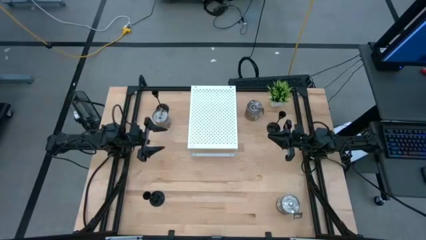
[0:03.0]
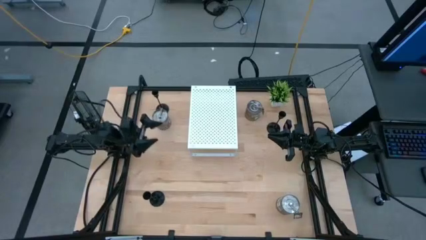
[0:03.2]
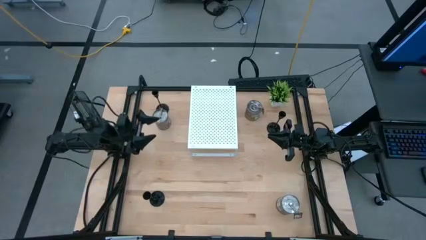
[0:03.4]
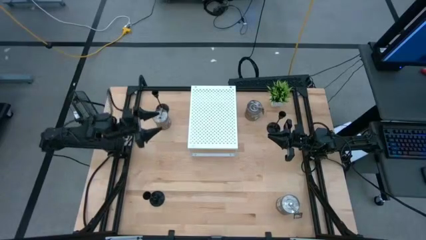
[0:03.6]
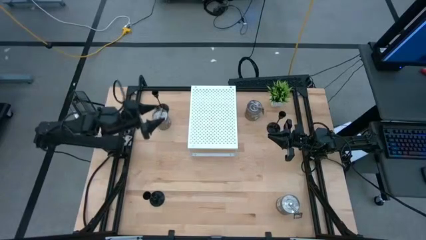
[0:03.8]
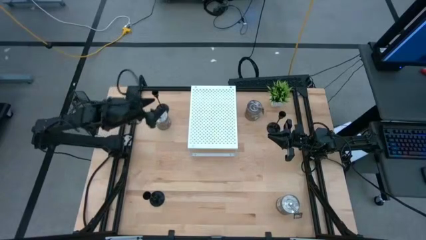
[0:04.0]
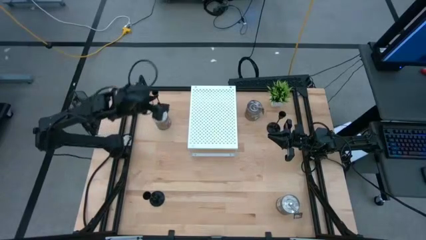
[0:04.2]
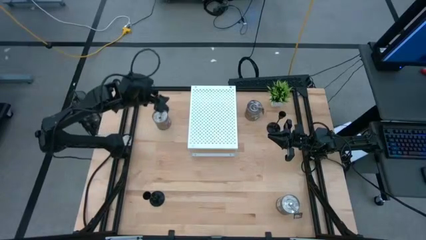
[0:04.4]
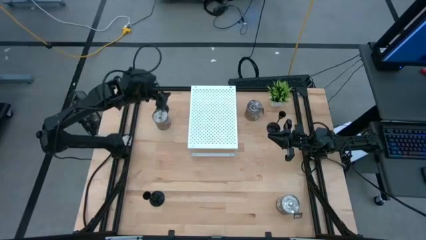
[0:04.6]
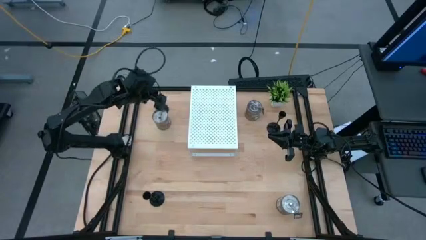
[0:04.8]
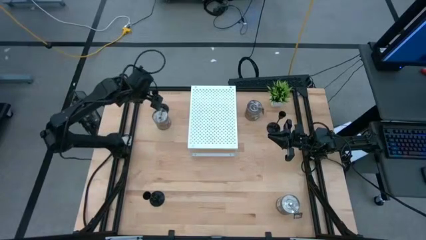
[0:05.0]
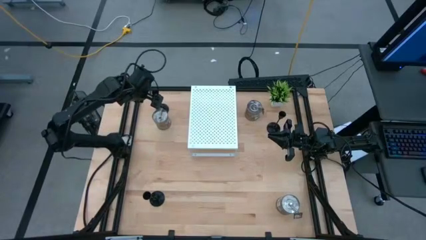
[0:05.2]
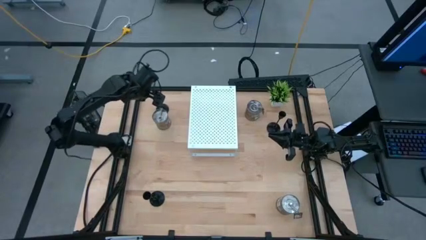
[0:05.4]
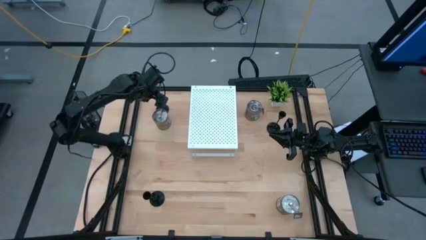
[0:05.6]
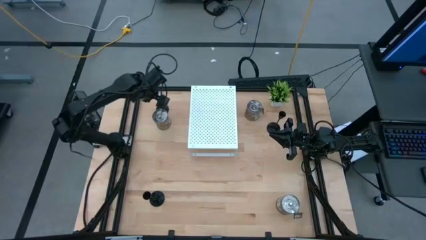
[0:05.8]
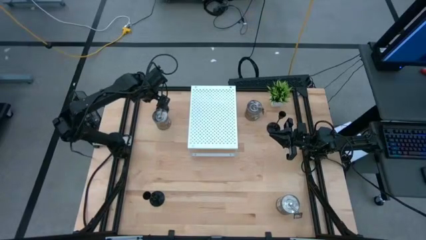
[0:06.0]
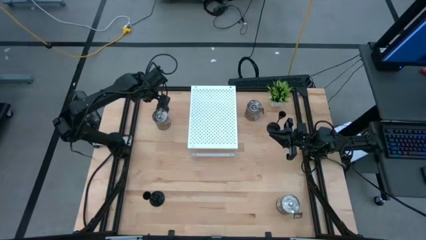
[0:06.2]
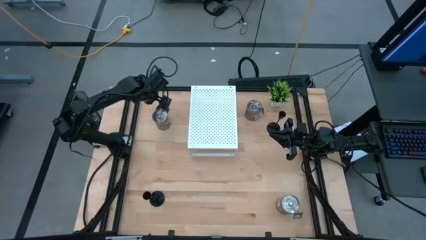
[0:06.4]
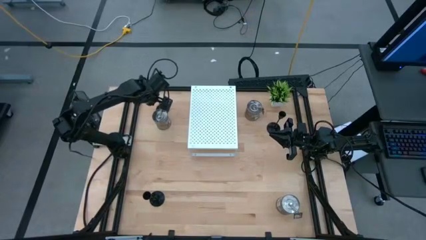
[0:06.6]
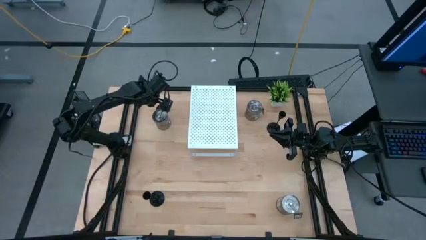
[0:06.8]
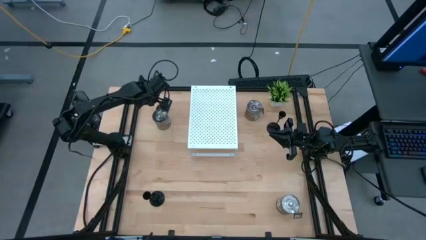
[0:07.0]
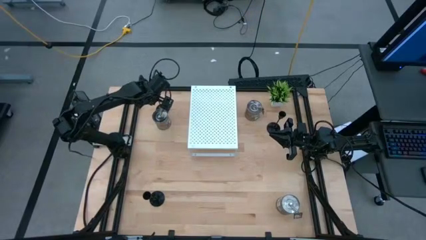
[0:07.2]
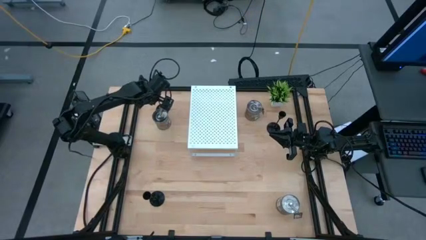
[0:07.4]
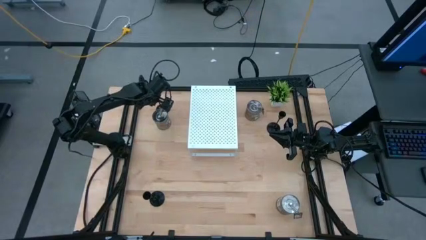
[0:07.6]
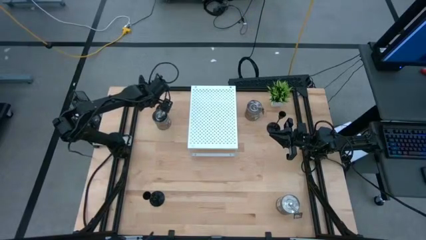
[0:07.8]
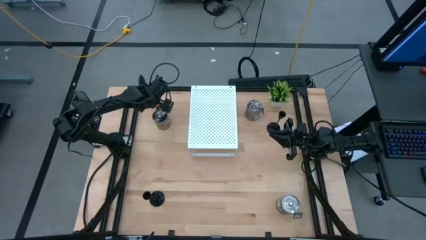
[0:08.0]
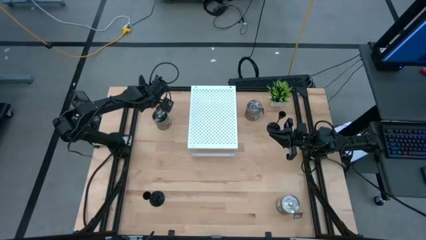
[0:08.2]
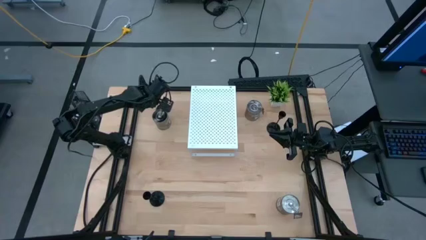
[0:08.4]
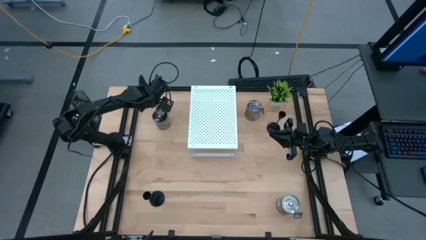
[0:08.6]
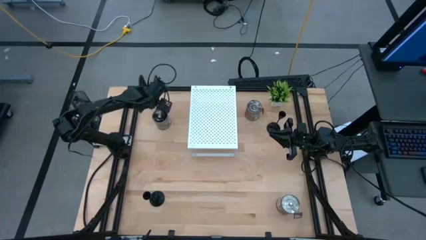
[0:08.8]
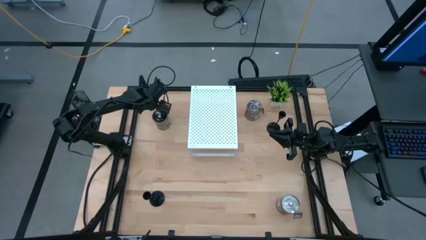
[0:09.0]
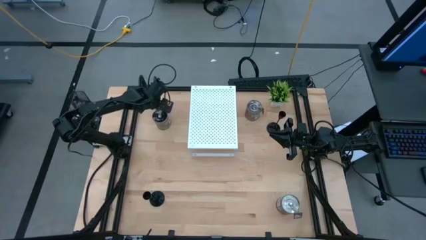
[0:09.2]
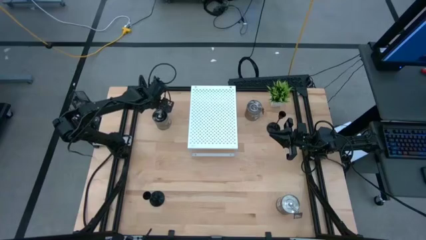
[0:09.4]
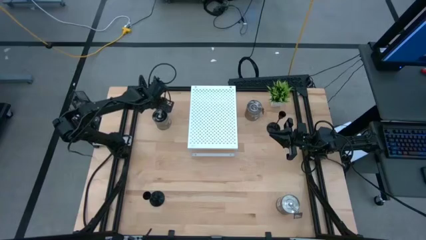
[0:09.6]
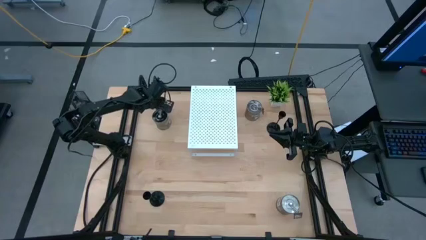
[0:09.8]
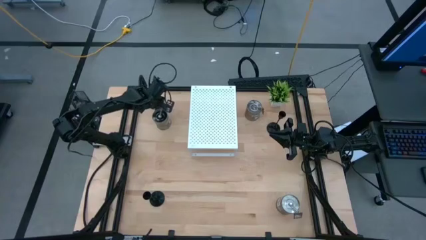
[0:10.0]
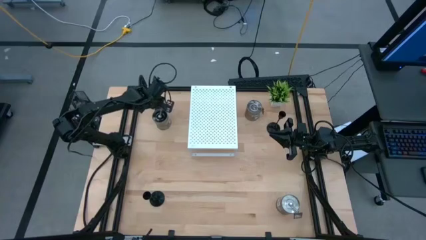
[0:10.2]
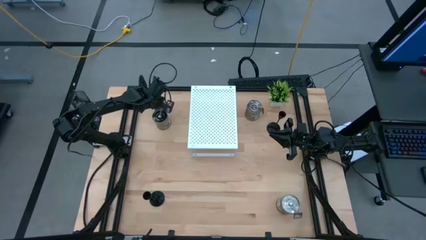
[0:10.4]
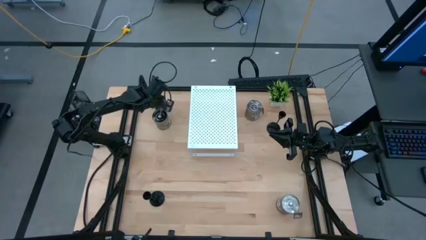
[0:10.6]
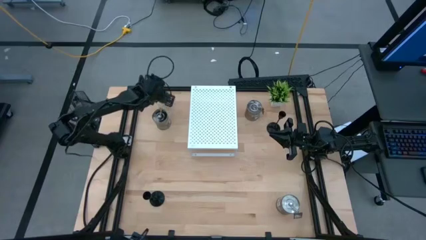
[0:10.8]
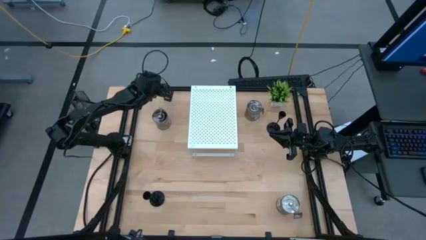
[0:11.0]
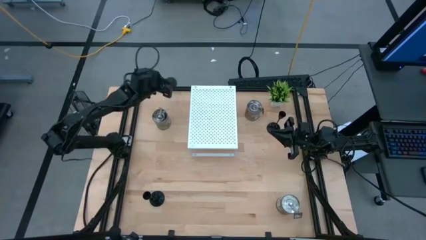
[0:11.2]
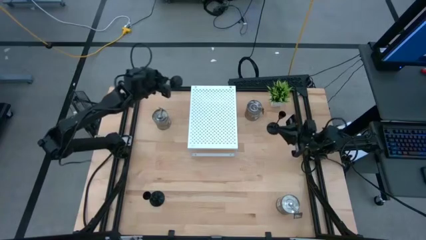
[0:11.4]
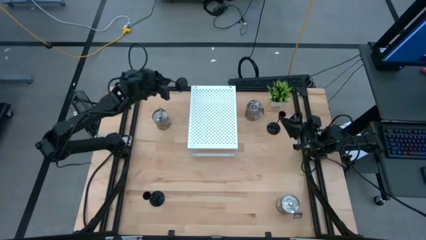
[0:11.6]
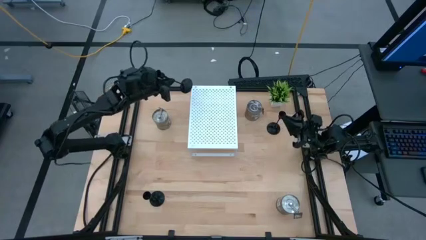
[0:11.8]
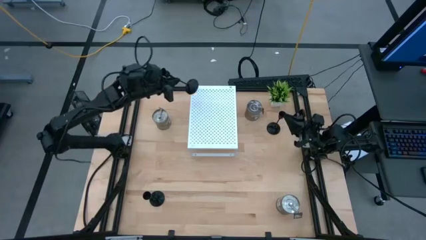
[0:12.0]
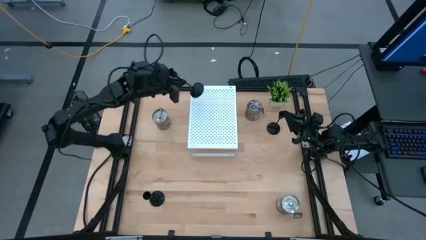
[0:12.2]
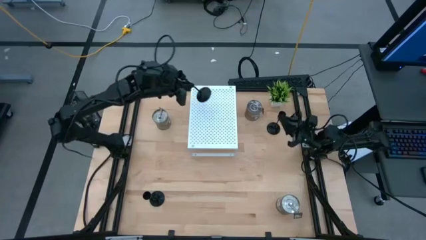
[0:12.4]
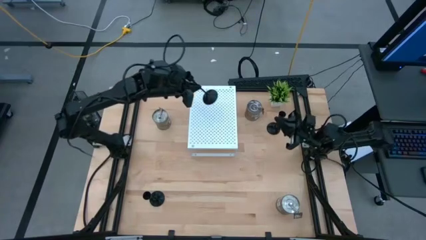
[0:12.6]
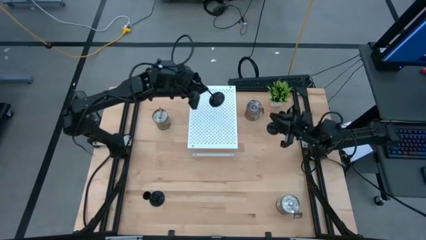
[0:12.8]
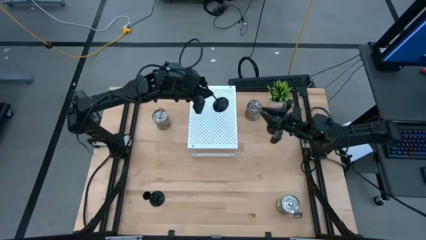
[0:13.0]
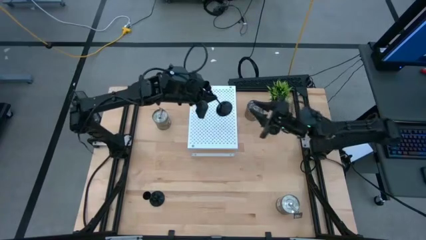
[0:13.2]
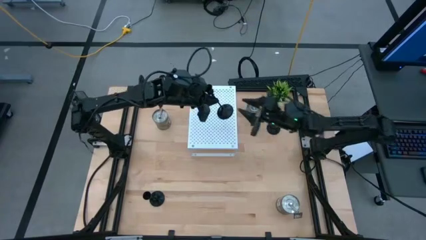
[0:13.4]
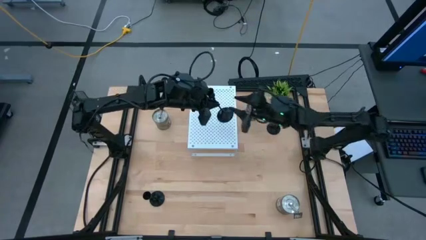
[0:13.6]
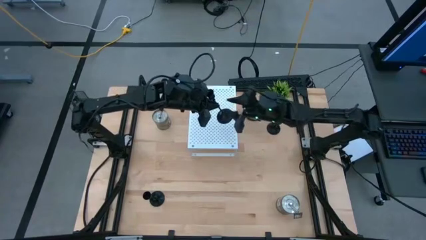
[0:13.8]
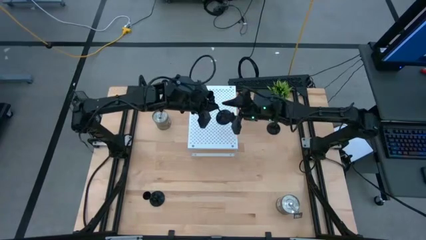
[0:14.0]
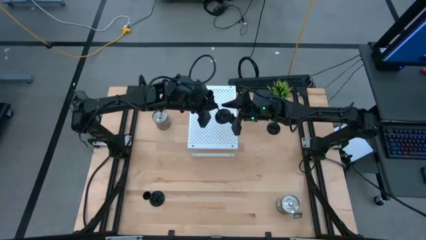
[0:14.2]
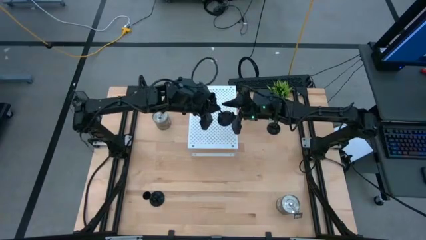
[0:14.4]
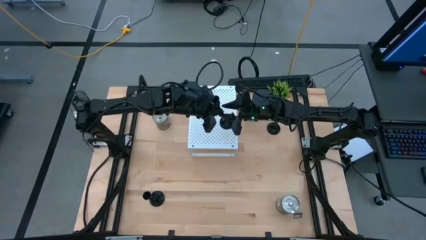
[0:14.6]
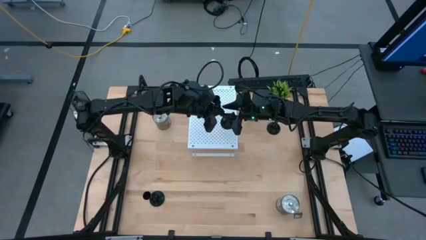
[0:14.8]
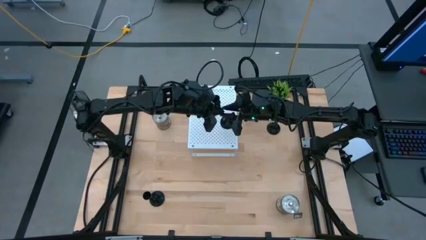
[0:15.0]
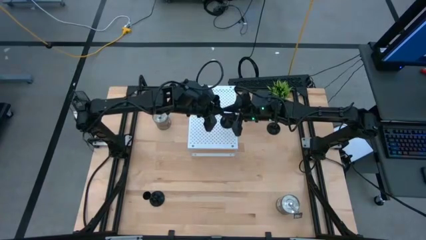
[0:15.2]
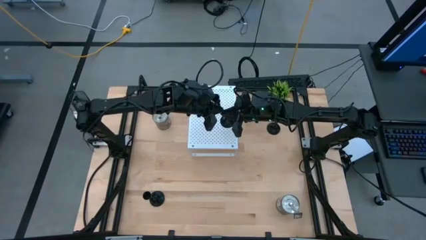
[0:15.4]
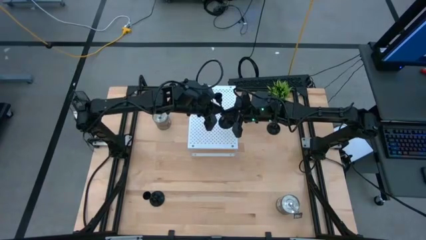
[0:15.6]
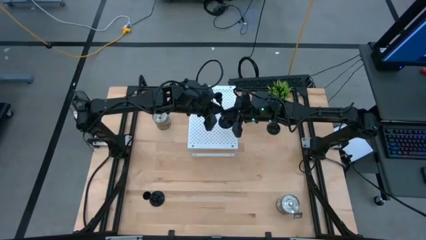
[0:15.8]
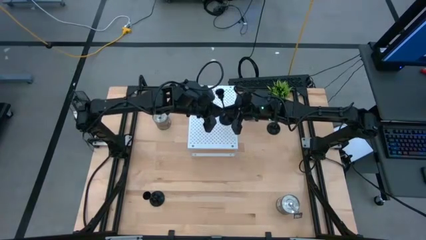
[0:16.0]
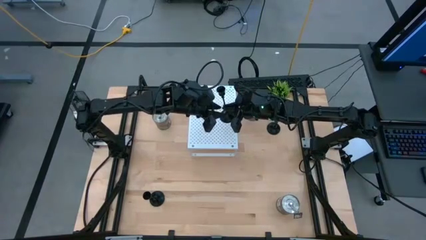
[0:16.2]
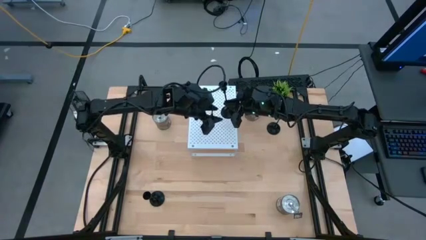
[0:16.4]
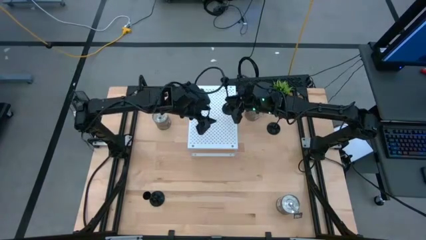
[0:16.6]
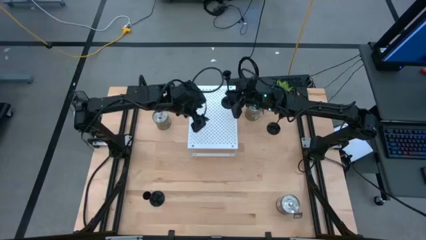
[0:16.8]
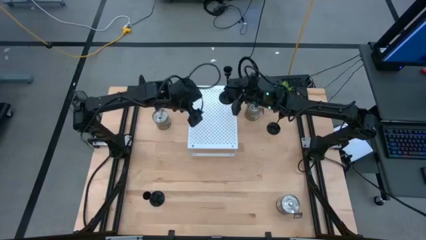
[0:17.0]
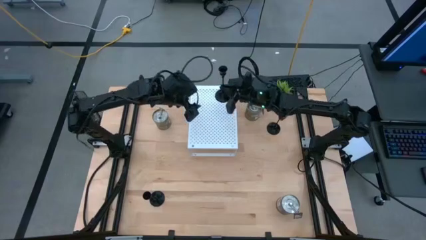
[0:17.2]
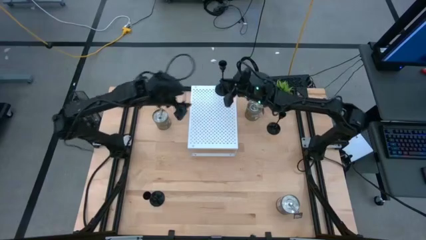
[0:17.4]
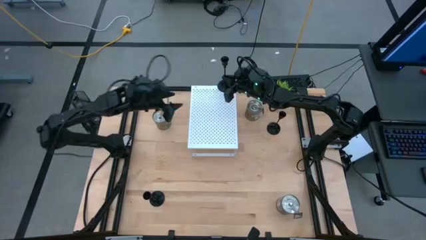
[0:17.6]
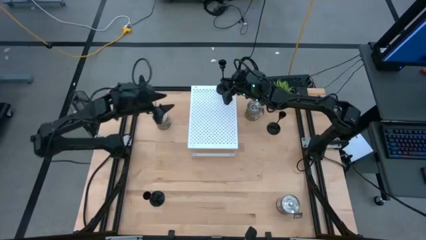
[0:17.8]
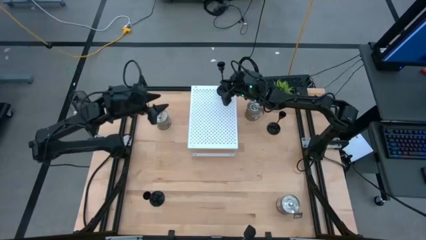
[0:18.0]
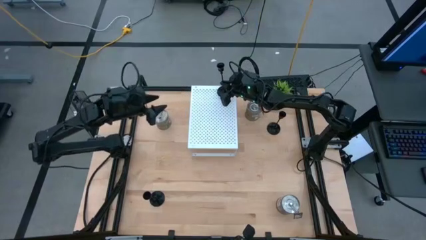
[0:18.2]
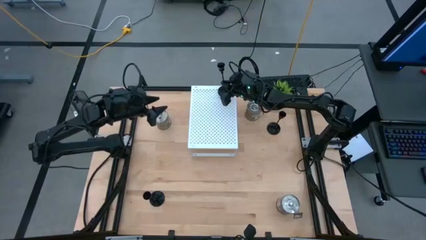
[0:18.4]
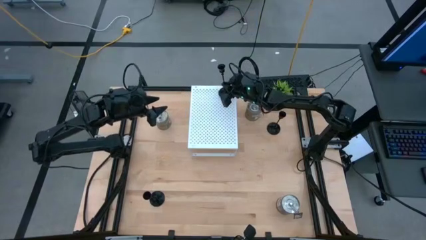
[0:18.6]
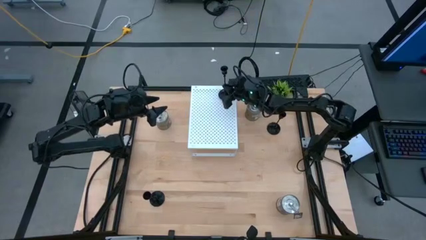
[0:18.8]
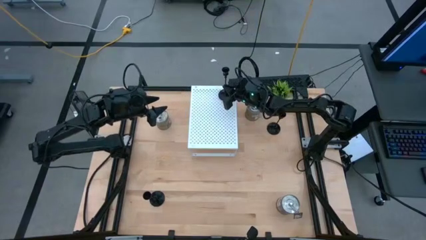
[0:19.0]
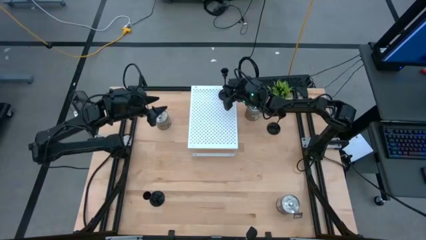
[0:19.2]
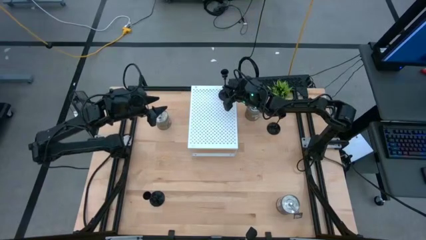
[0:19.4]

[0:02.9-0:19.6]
Task: Pick & Place candle stick holders
Put the top left black candle holder on the shelf
